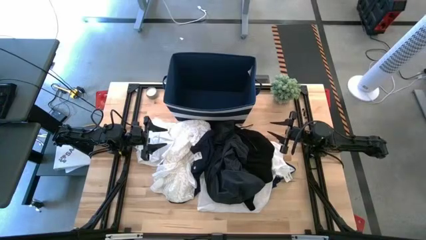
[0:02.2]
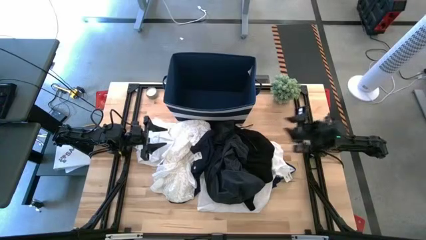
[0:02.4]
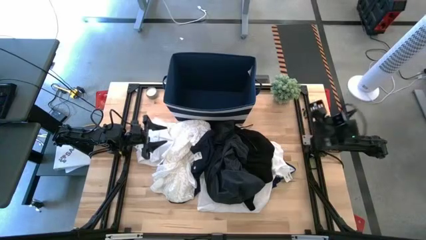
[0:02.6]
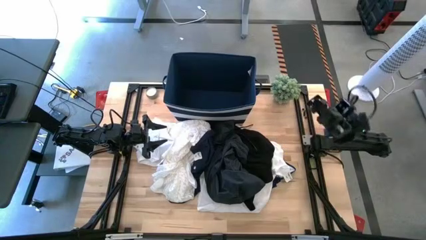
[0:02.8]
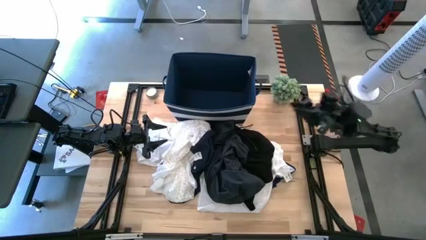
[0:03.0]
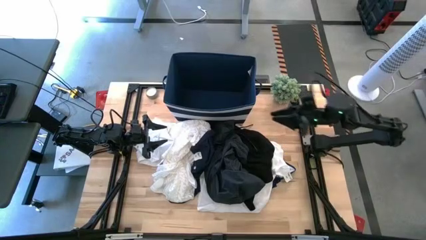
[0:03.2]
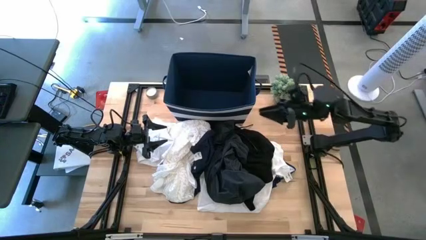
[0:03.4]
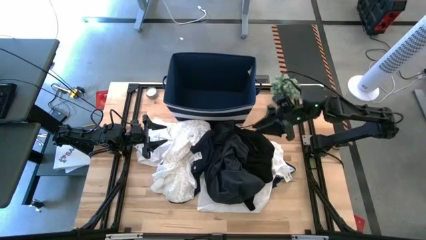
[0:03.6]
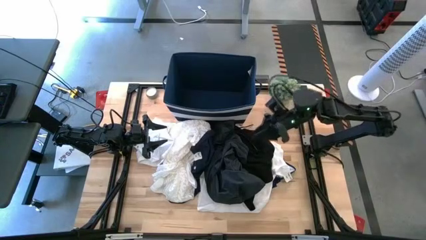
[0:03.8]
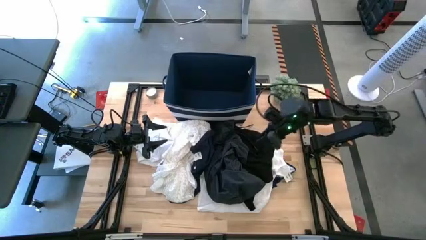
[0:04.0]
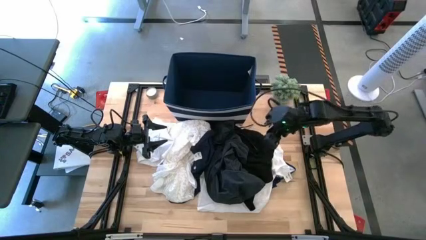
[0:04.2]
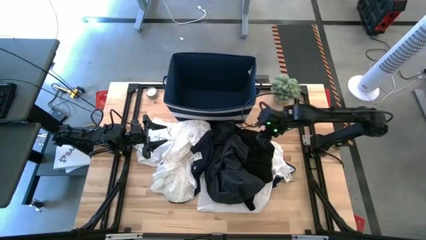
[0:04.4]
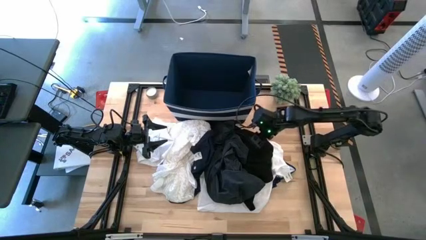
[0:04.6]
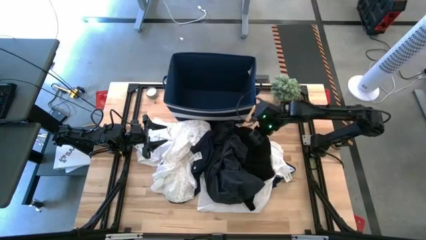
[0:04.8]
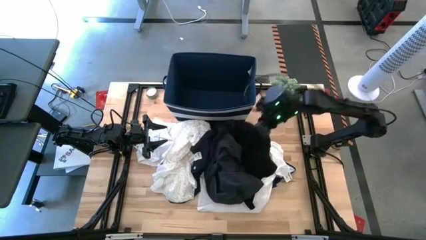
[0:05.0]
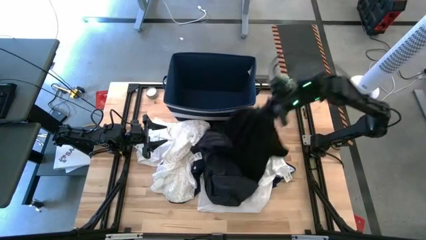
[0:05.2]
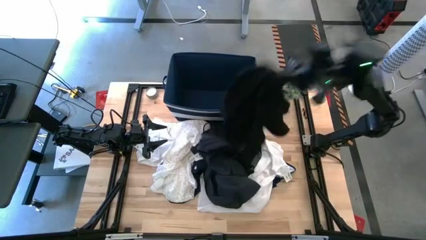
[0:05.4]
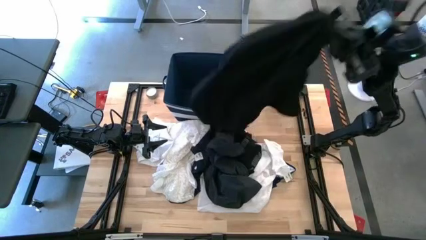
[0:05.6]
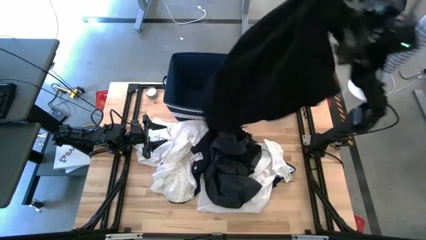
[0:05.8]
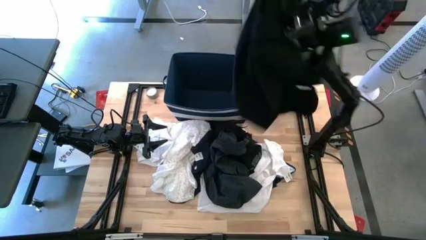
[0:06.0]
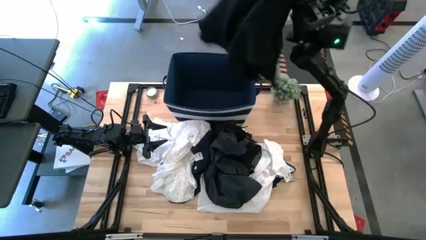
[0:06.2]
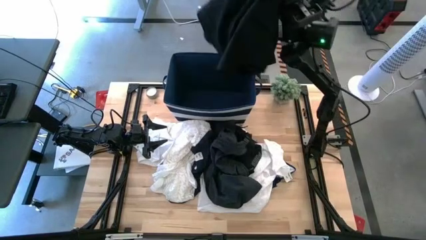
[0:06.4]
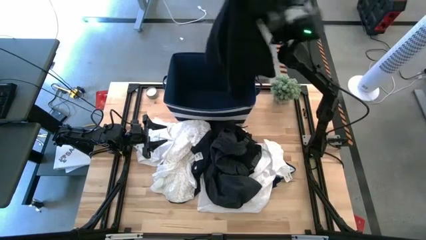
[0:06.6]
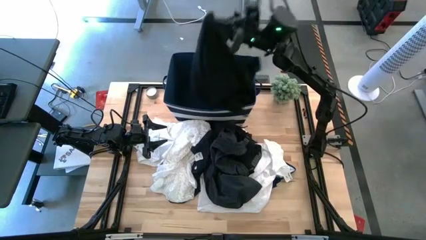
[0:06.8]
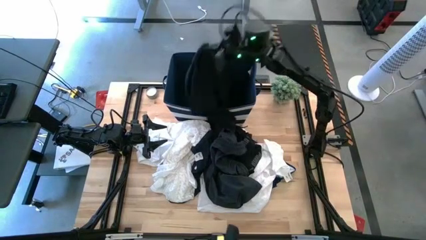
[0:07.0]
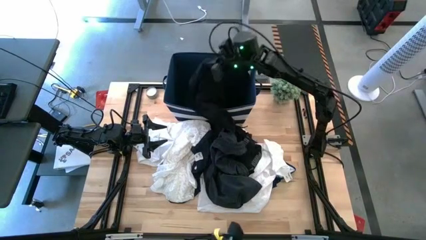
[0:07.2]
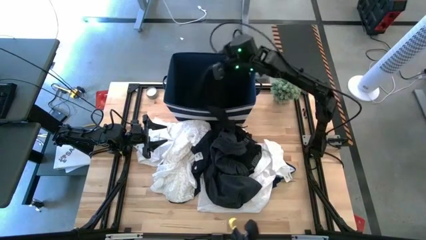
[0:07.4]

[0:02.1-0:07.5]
Task: Sort clothes
Put the black shirt into the blue bin

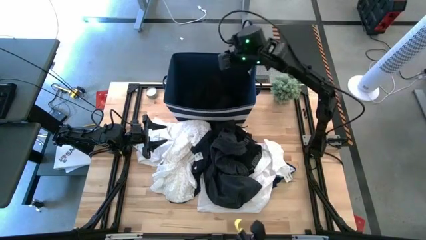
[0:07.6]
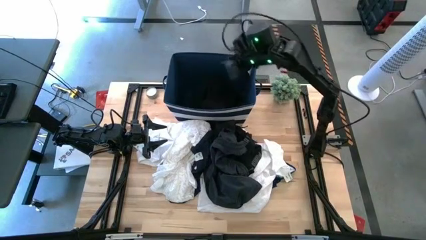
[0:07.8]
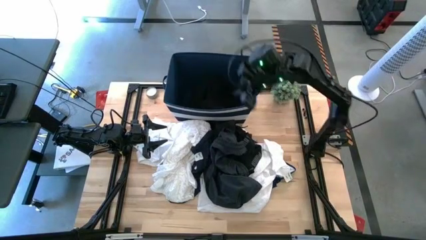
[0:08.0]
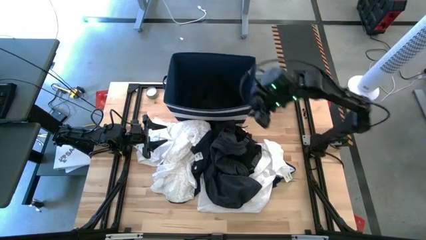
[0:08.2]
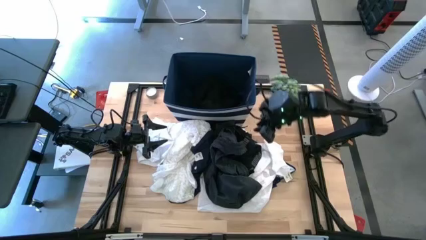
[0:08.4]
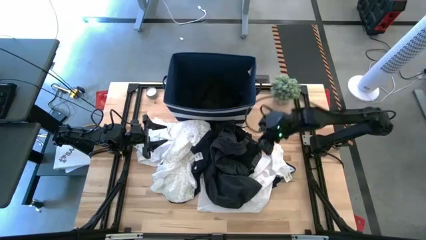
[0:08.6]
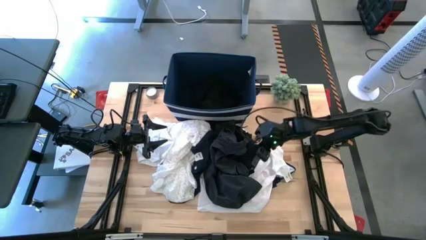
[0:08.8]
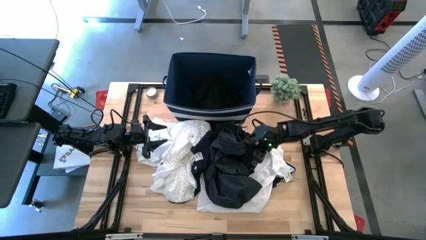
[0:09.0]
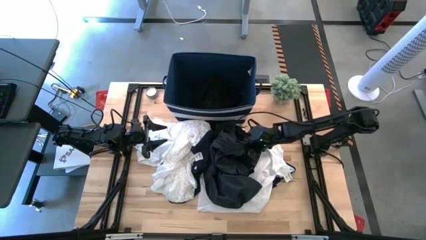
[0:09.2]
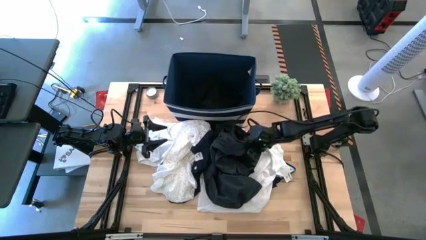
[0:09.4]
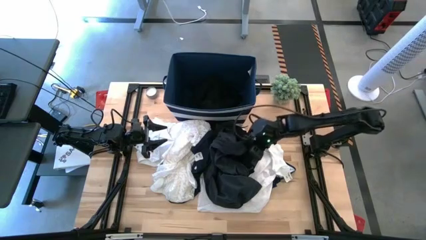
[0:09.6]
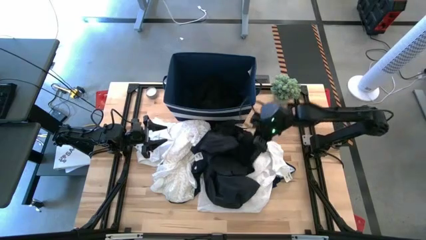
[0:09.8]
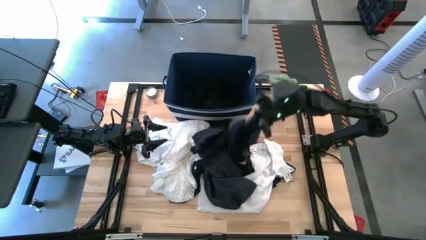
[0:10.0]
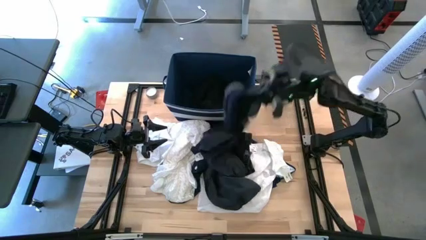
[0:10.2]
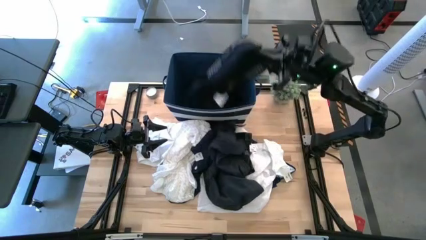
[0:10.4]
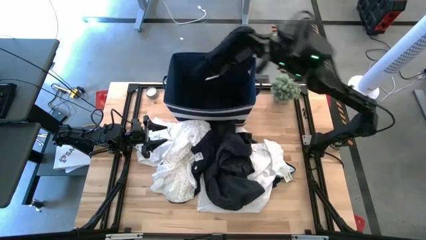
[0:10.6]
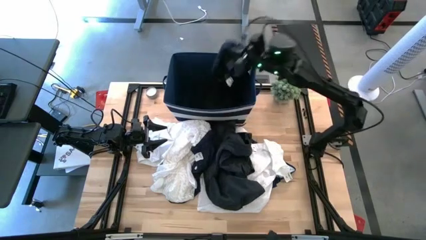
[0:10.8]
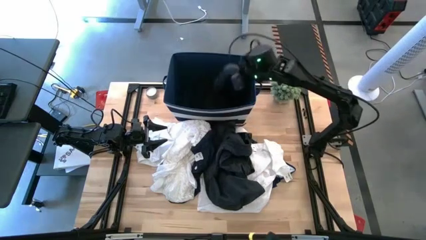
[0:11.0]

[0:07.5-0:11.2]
Put the dark blue boxer into the blue bin

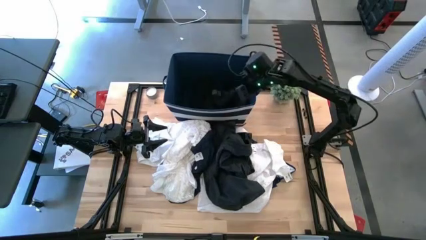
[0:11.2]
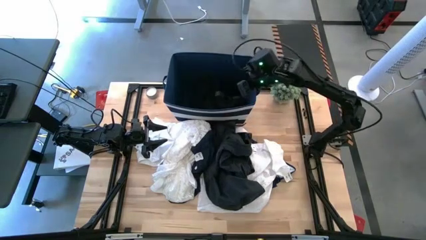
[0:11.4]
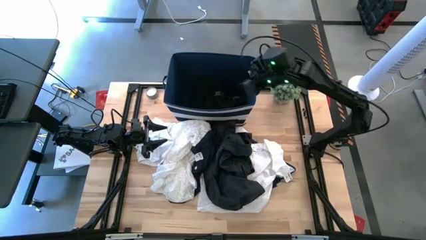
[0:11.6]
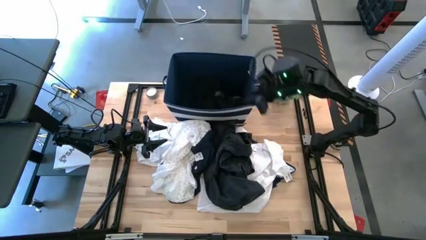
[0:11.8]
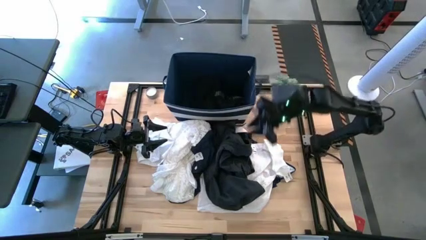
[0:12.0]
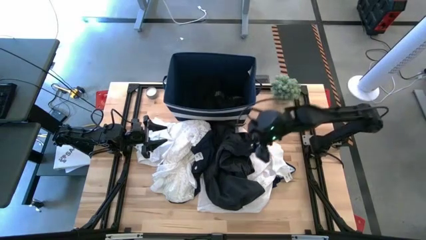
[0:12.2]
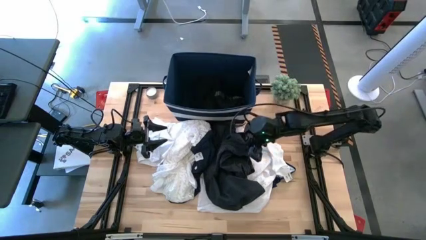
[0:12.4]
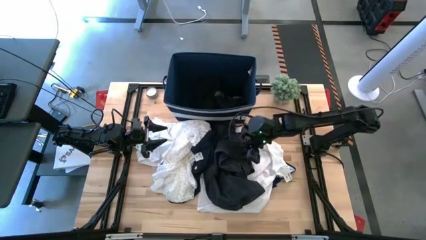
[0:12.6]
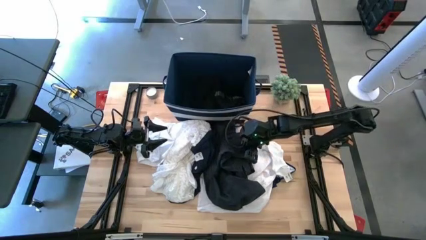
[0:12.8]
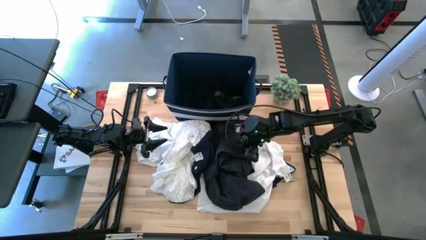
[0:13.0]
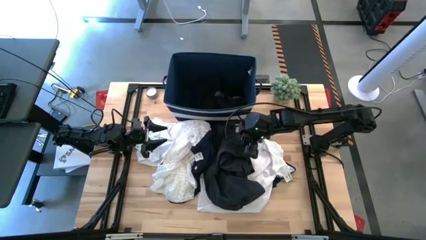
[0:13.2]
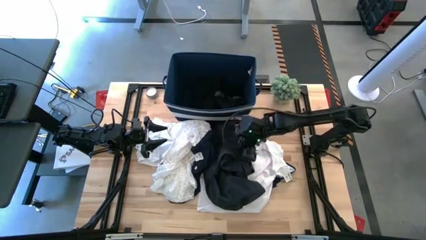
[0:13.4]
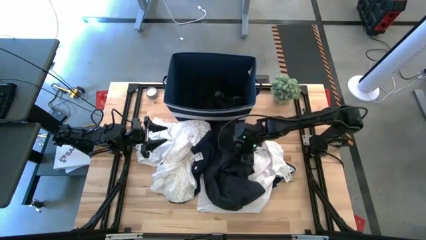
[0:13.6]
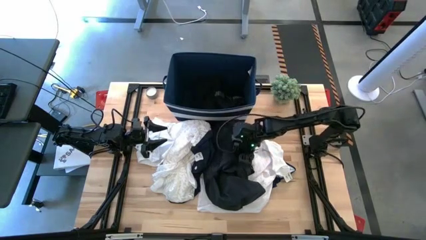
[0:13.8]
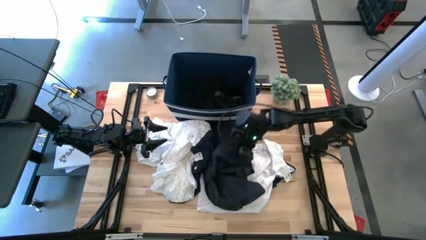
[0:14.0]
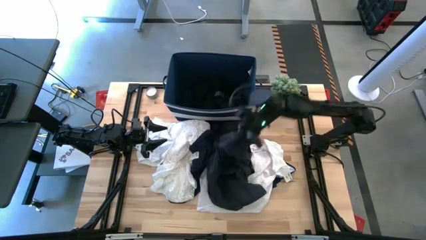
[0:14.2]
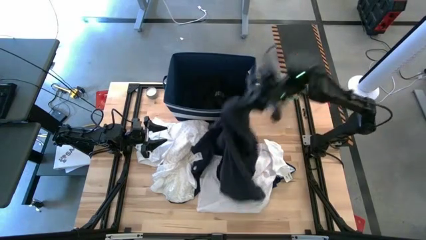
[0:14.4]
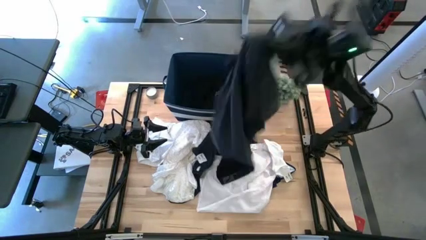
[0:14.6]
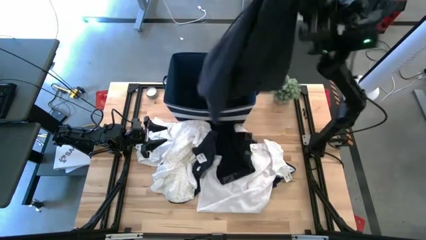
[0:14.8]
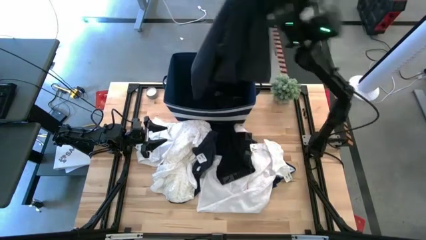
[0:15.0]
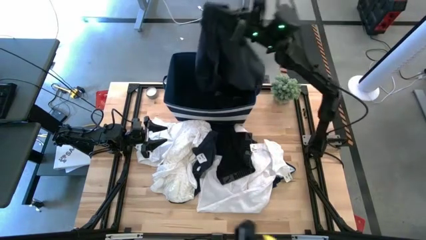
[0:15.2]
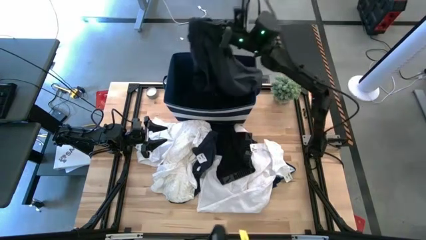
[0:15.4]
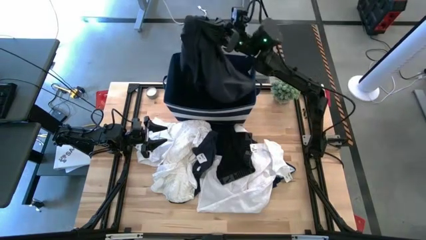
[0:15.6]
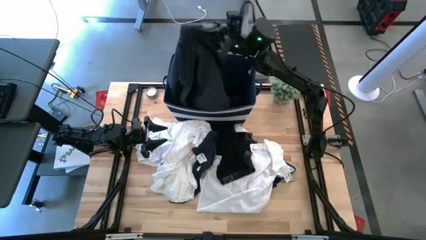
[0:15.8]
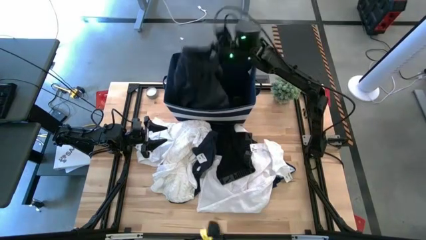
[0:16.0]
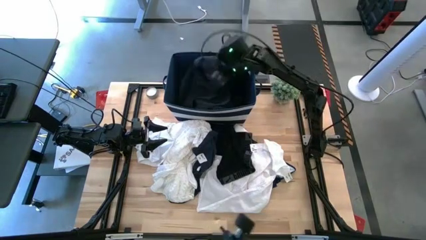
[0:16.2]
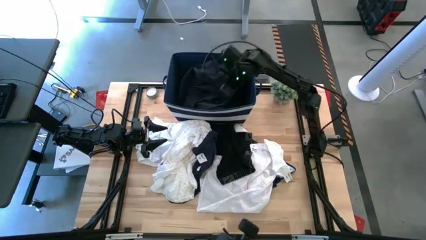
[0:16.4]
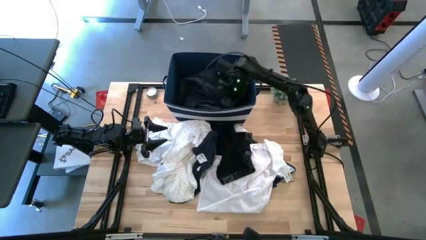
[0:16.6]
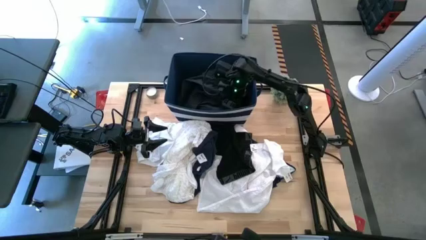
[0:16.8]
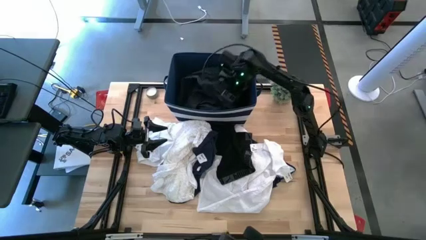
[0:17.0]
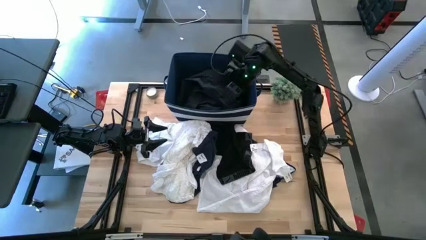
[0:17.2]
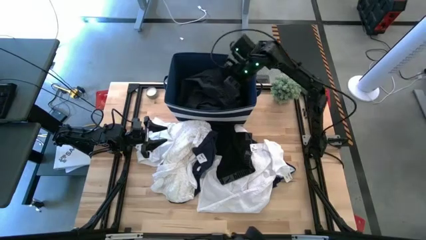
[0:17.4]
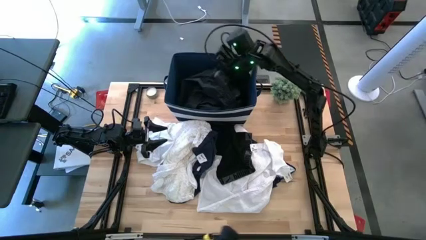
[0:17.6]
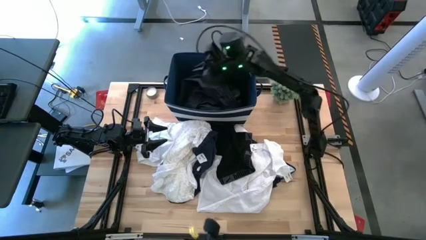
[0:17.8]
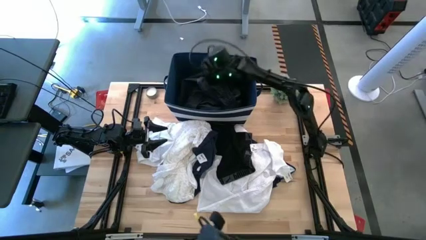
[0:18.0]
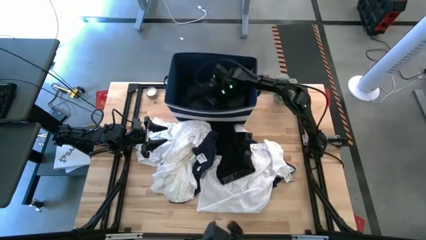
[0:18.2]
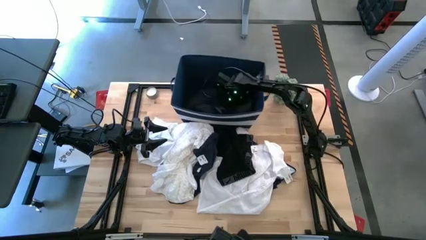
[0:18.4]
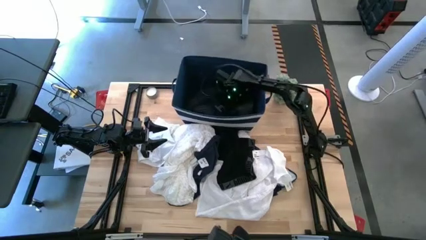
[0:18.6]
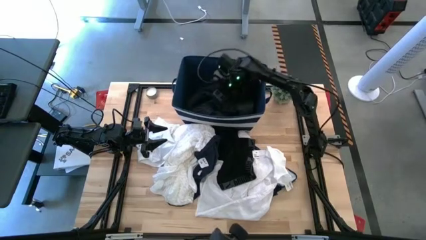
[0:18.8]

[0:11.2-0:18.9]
Put the gray coat into the blue bin

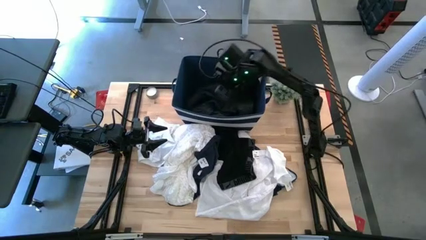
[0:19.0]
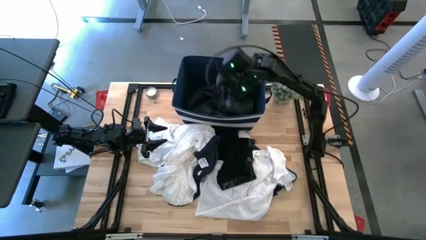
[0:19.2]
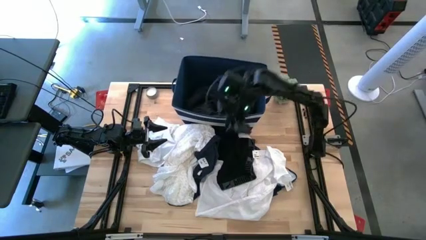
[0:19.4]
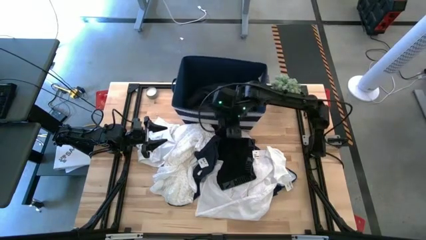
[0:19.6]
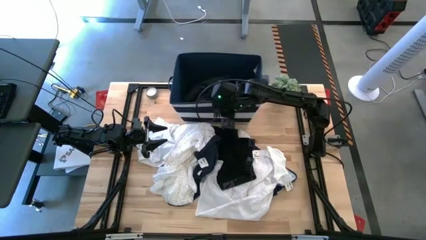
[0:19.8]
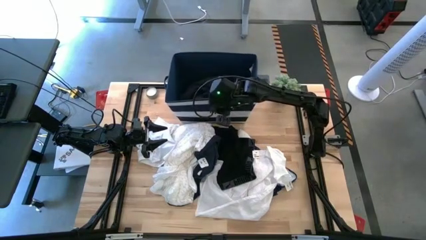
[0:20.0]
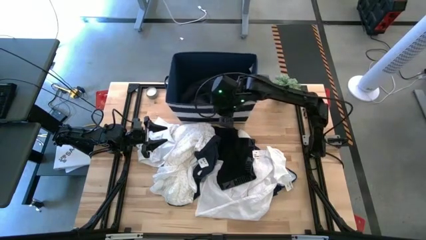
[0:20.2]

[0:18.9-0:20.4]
Adjust the blue laundry bin
